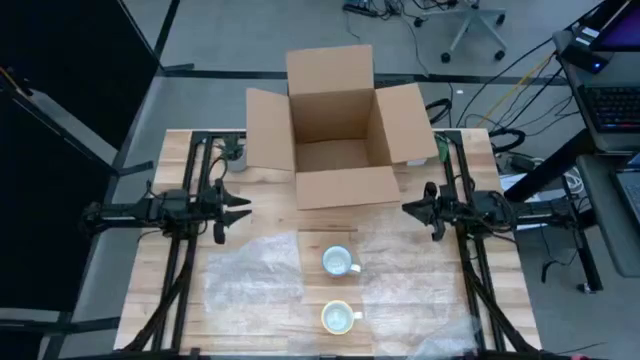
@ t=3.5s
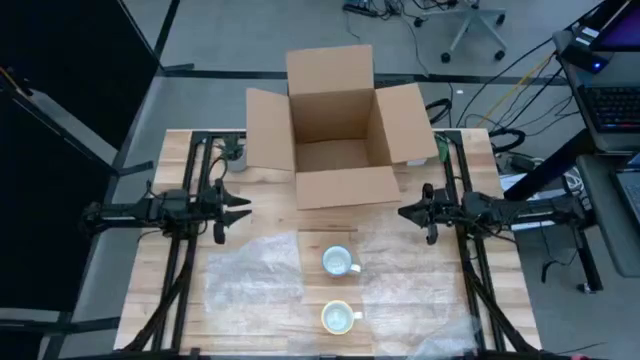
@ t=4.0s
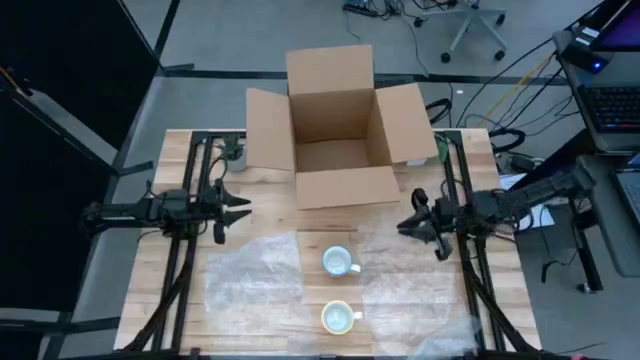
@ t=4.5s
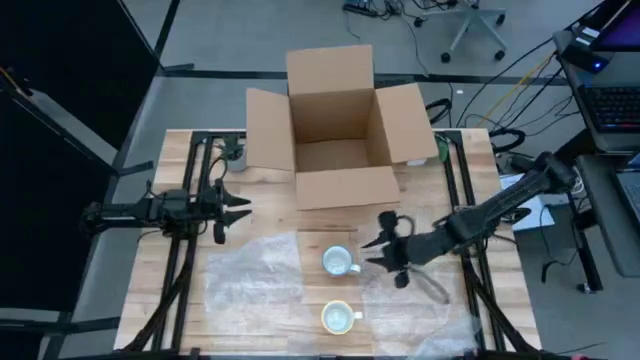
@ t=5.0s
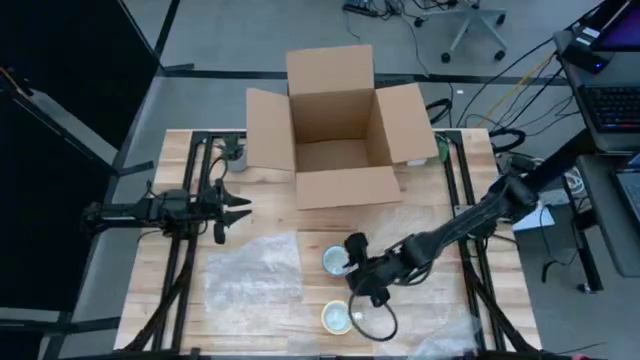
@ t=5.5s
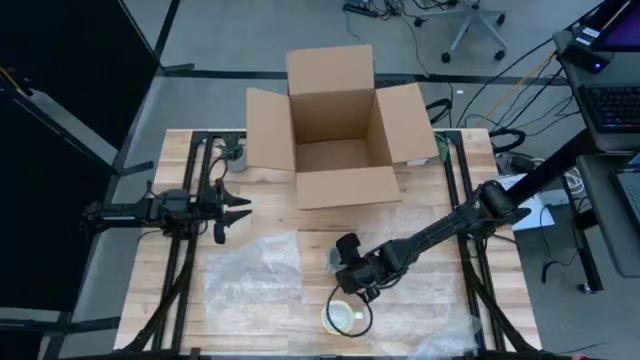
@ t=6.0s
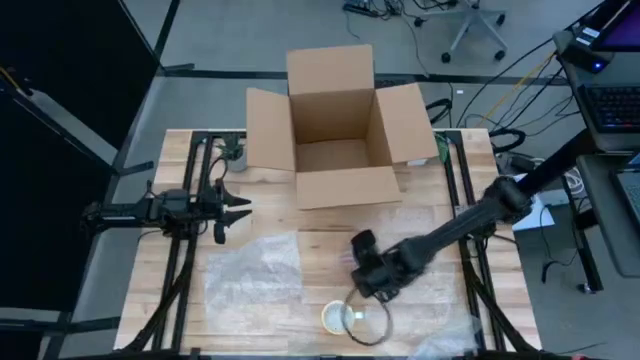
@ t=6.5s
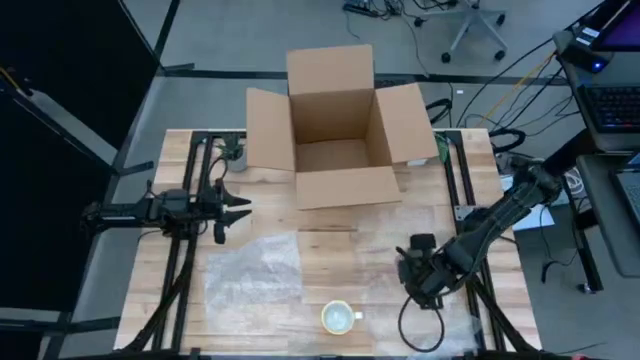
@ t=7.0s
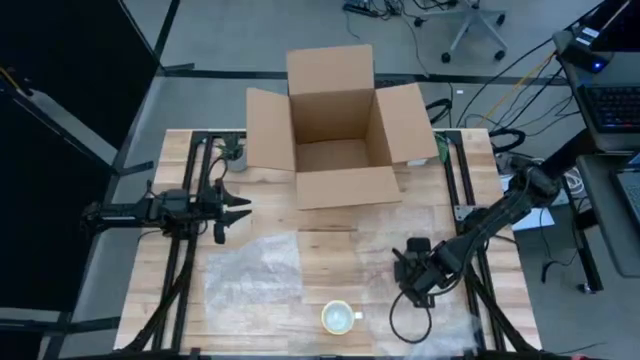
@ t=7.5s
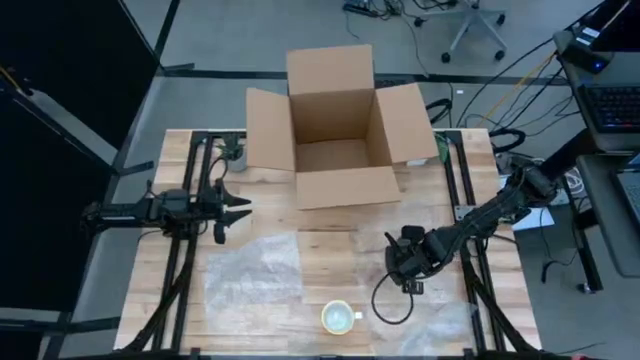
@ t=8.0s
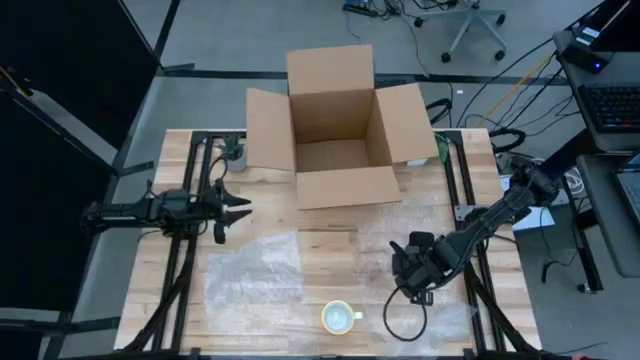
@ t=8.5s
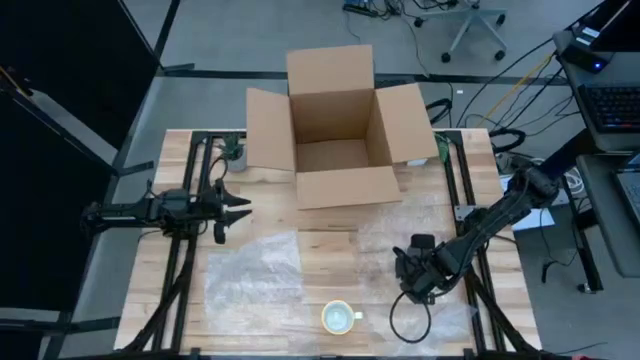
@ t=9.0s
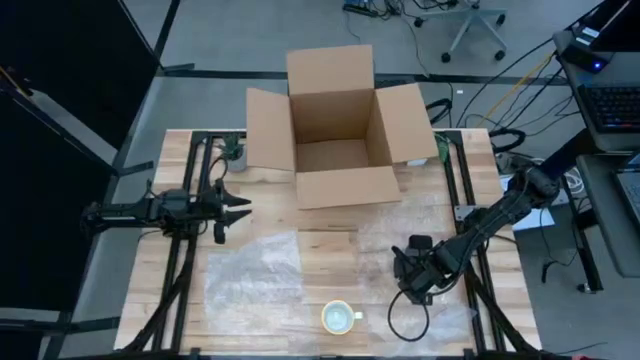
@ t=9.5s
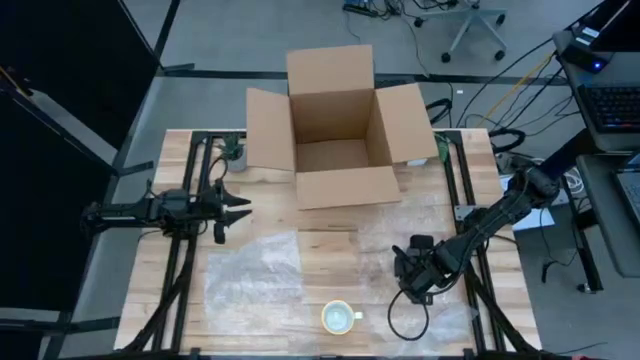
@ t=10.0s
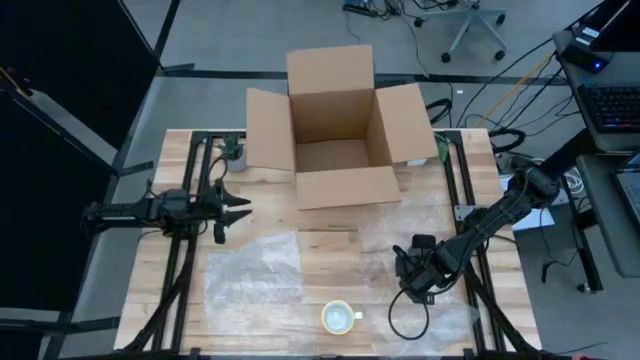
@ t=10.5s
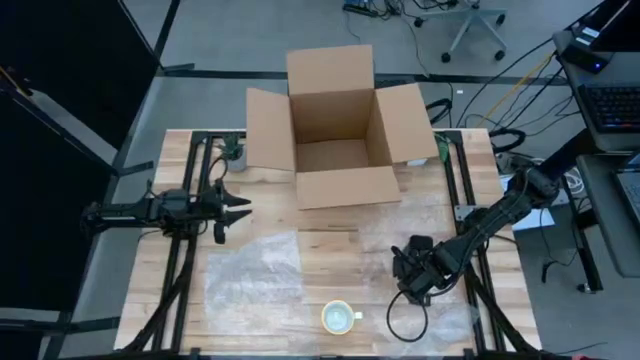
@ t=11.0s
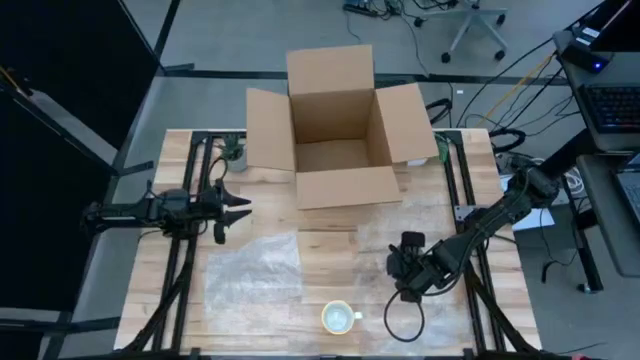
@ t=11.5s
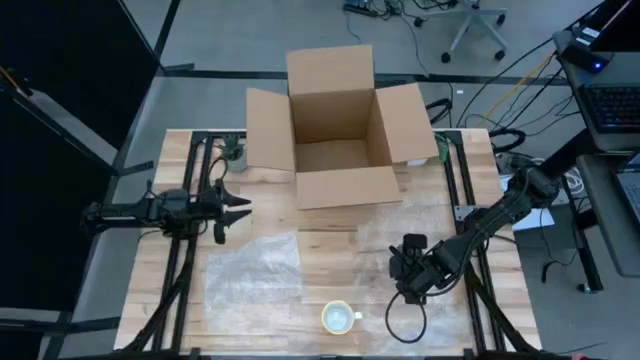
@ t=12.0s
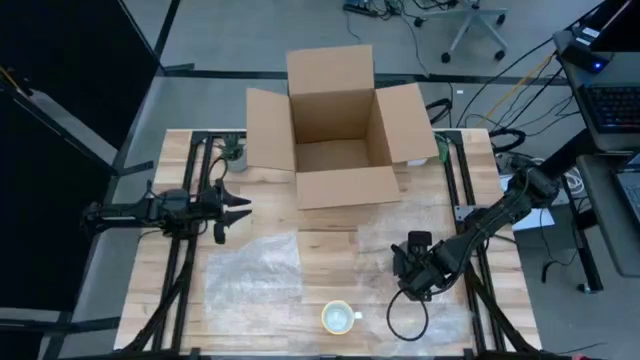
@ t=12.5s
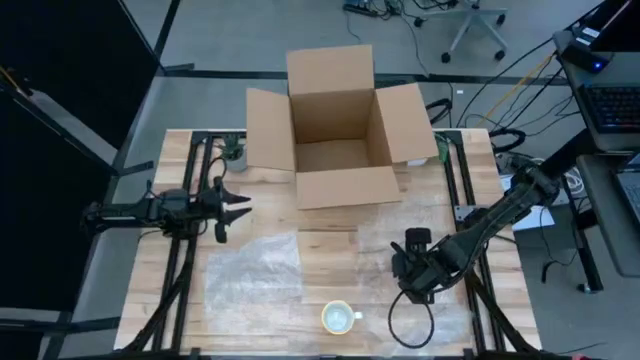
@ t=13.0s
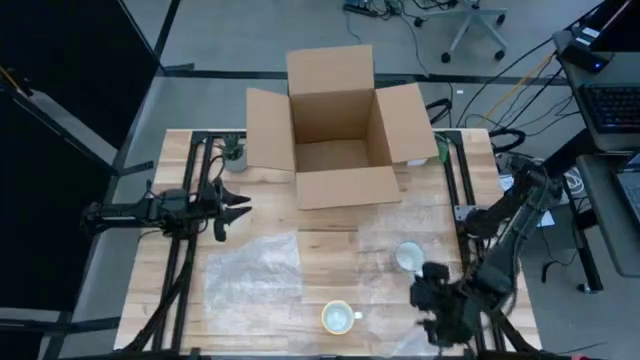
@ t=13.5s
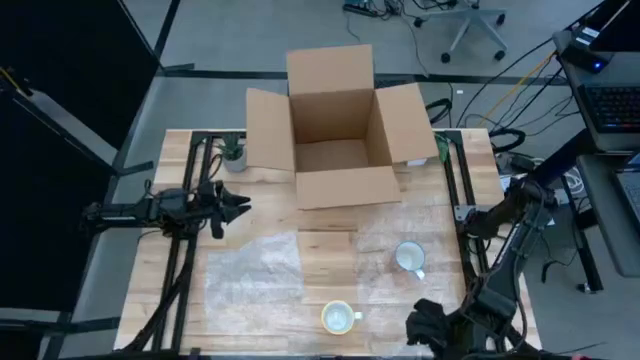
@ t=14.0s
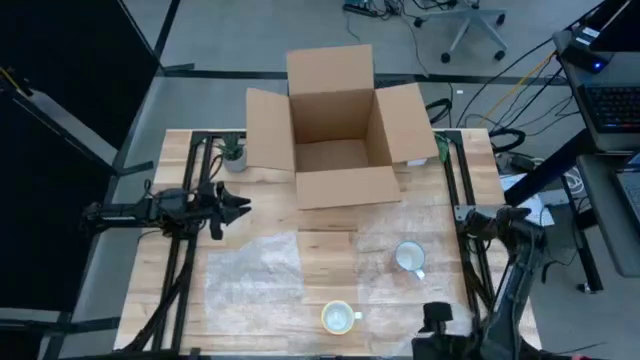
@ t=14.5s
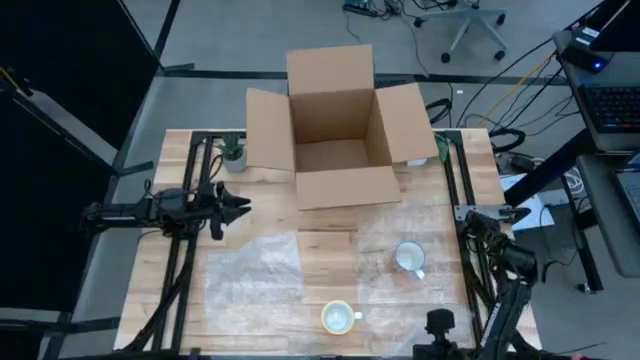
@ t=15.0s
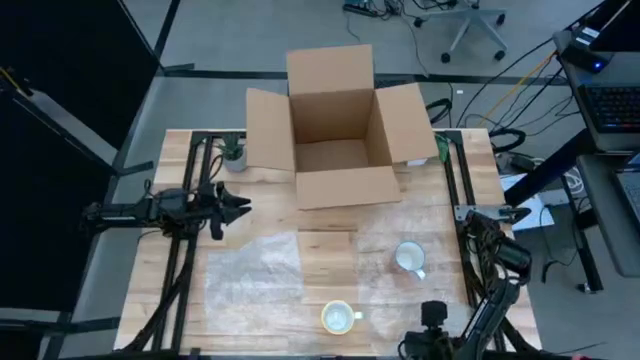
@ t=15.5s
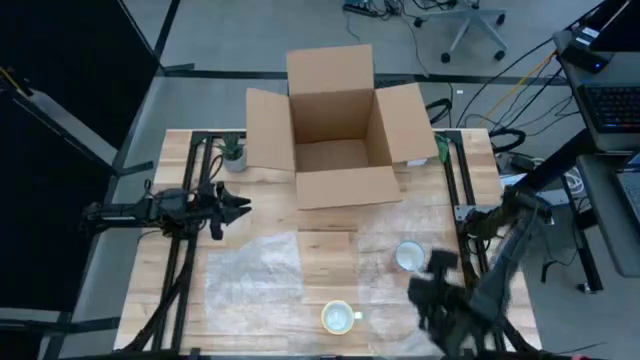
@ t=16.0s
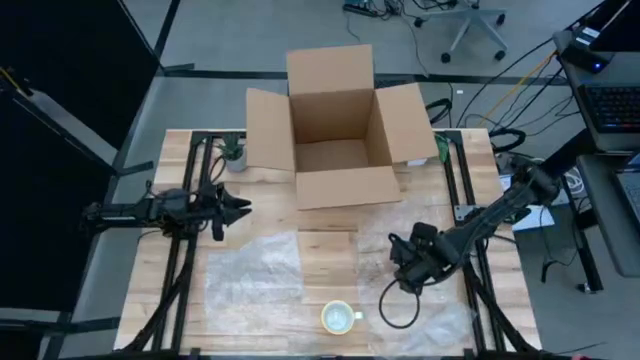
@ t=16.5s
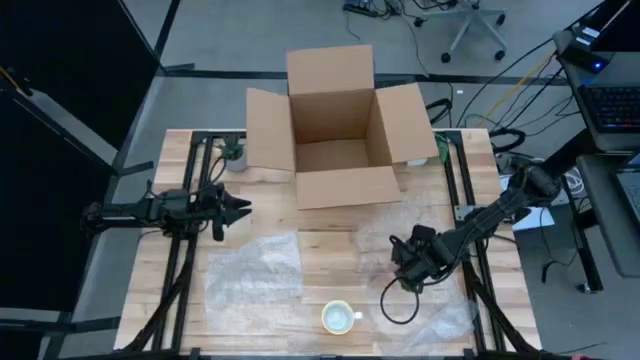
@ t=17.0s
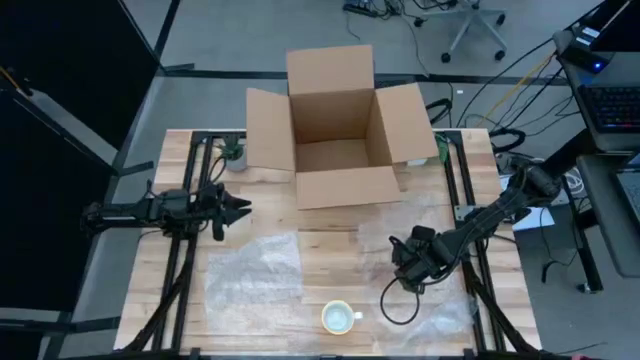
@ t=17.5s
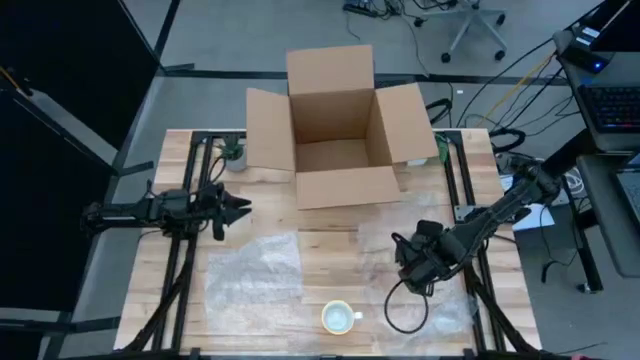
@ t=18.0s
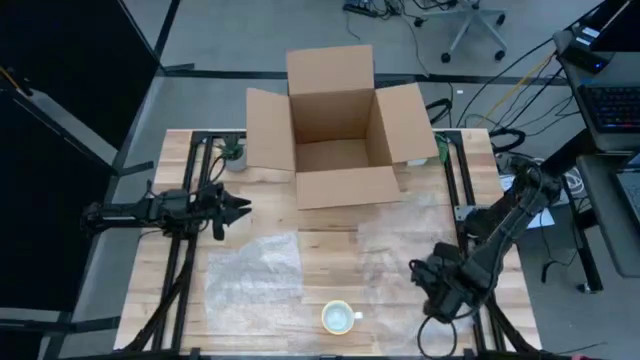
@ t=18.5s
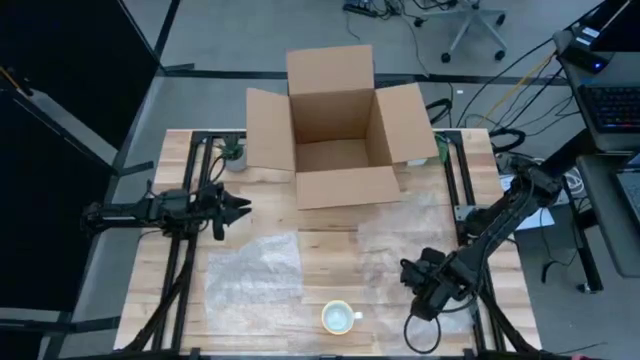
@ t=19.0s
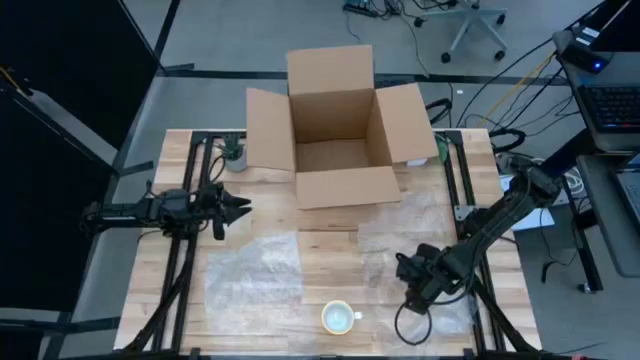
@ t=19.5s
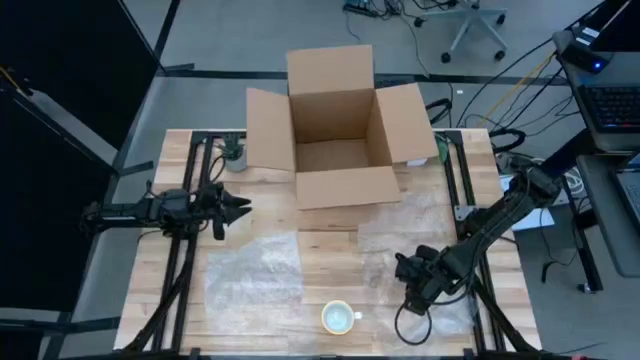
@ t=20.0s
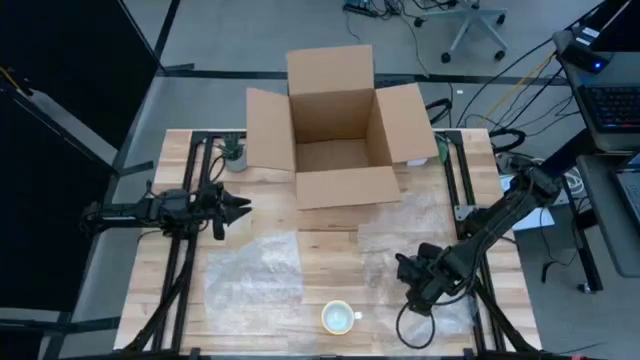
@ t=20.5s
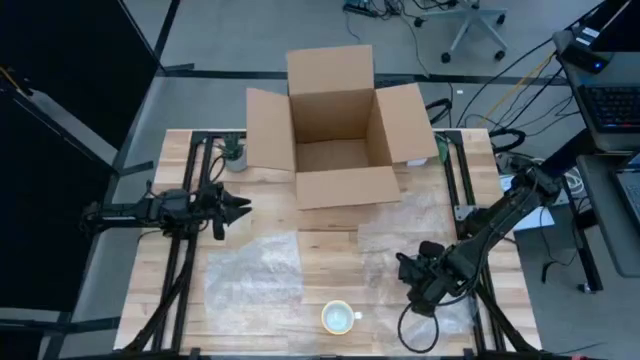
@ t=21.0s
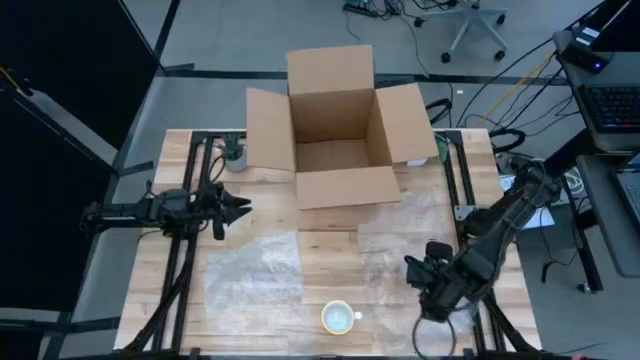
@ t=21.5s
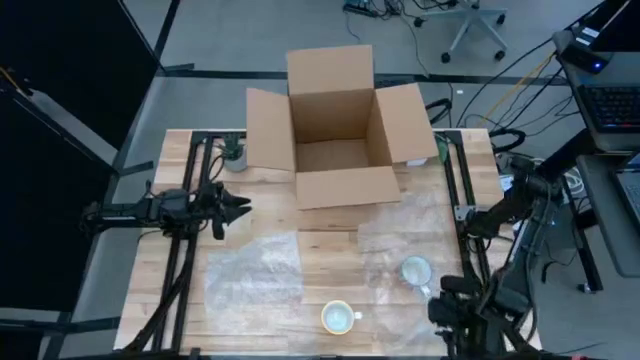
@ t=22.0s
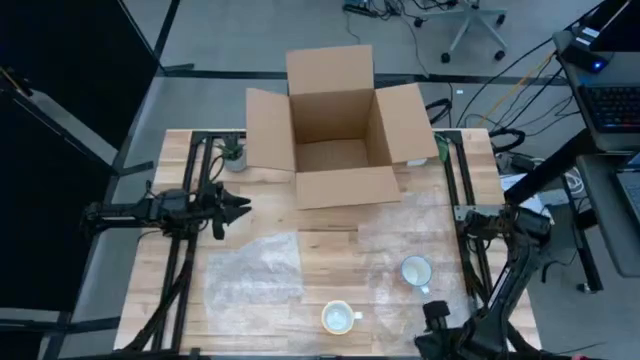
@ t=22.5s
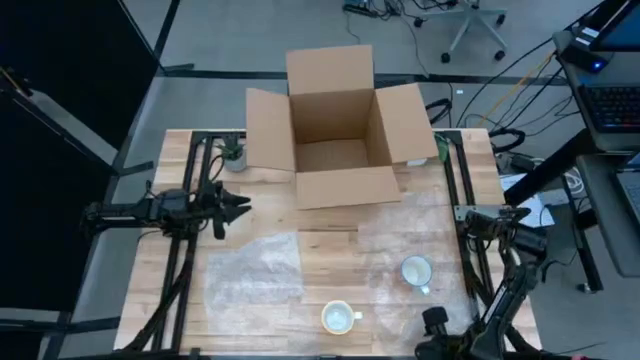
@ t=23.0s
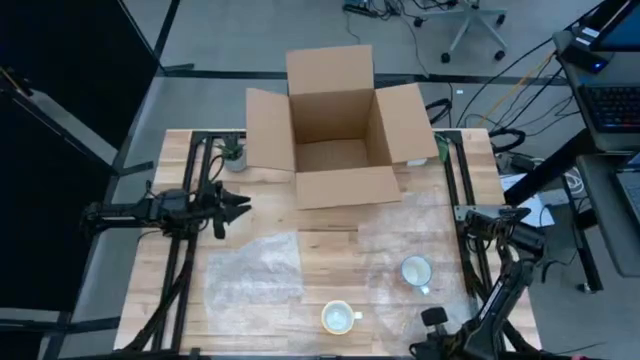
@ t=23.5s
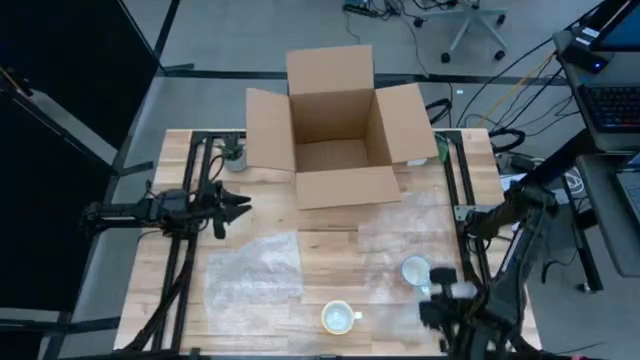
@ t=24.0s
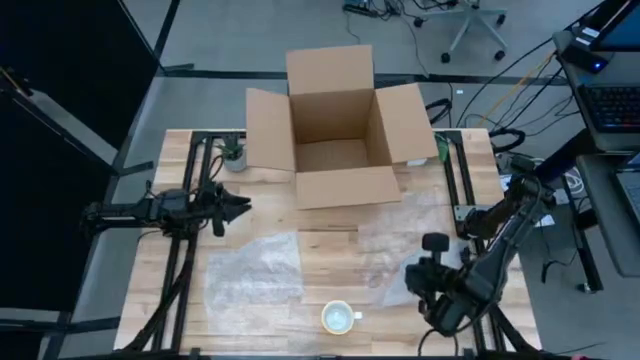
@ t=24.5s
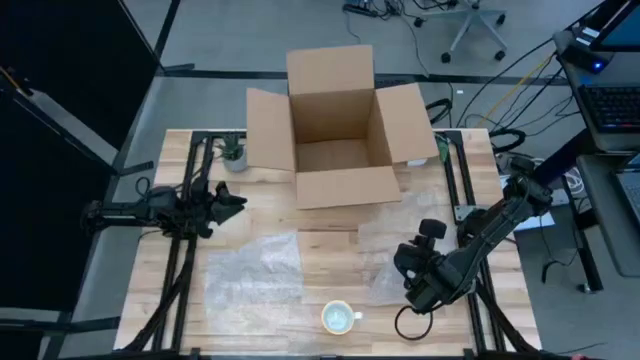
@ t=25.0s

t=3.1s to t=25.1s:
Task: wrap mug
Wrap the red mug with bubble wrap
